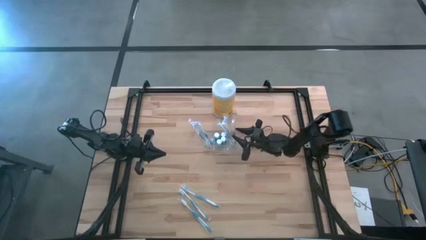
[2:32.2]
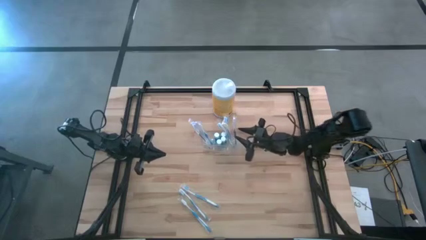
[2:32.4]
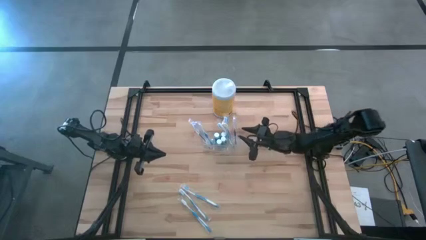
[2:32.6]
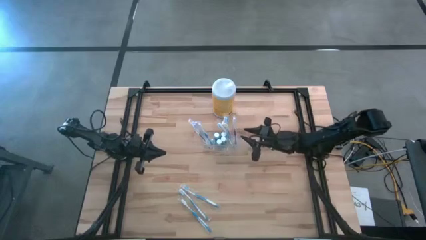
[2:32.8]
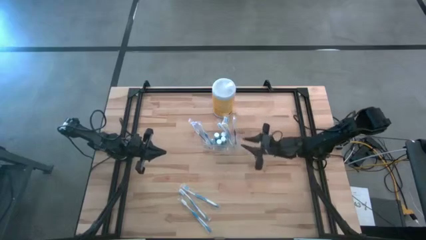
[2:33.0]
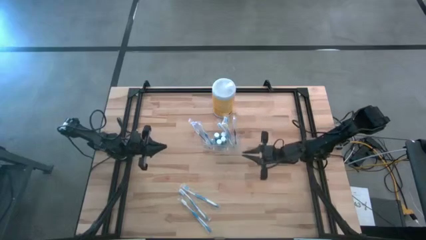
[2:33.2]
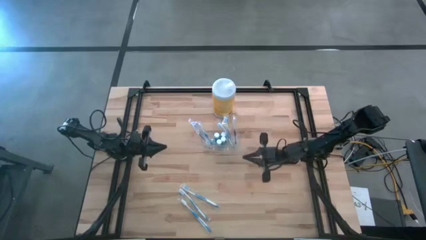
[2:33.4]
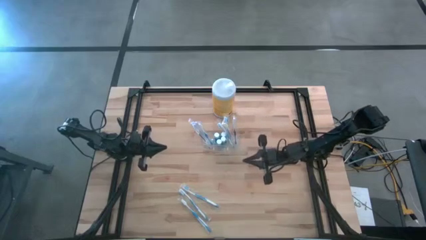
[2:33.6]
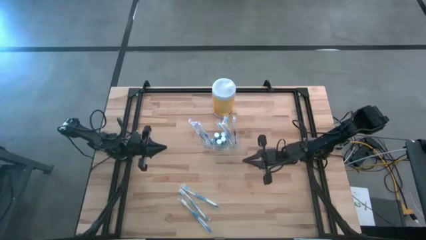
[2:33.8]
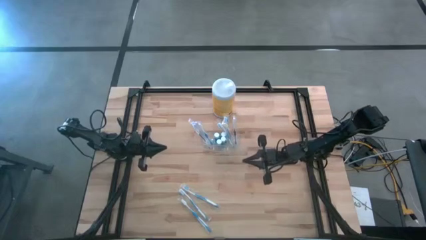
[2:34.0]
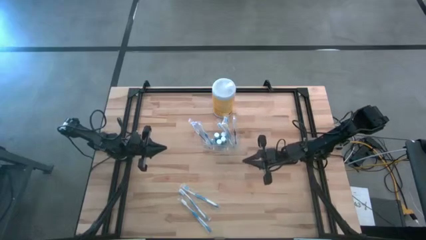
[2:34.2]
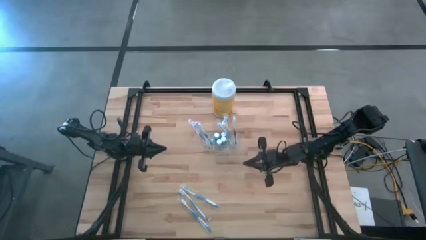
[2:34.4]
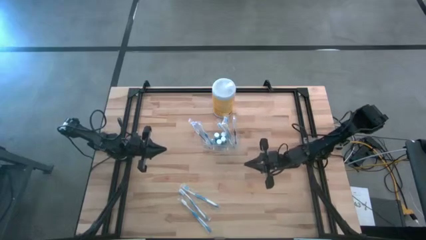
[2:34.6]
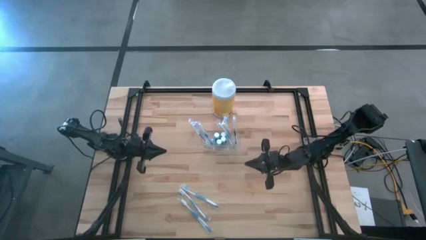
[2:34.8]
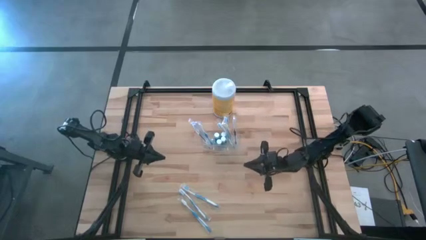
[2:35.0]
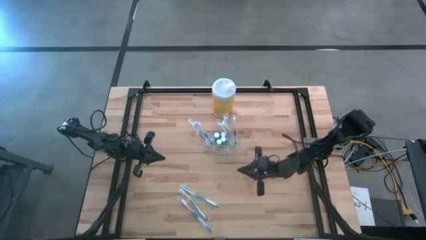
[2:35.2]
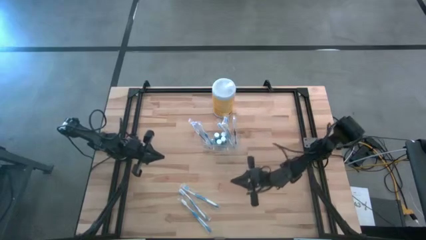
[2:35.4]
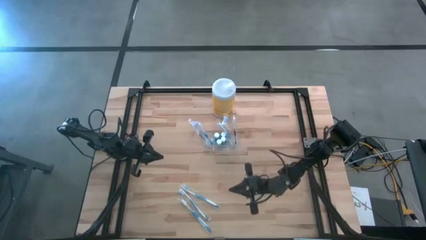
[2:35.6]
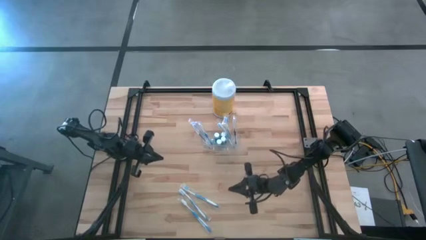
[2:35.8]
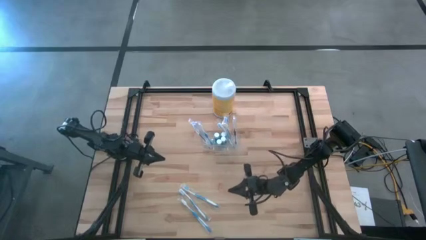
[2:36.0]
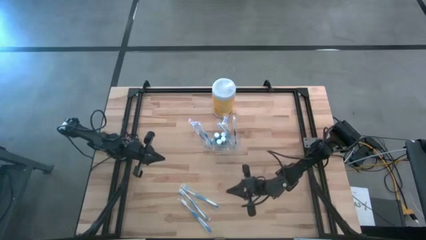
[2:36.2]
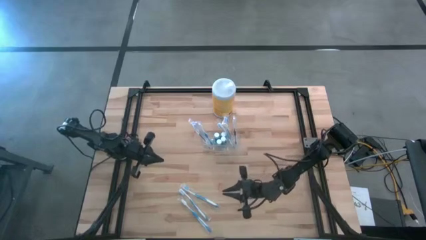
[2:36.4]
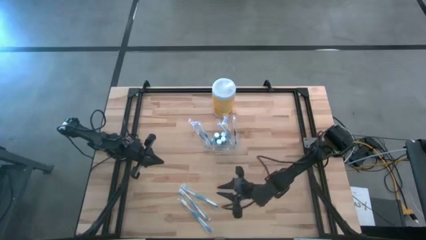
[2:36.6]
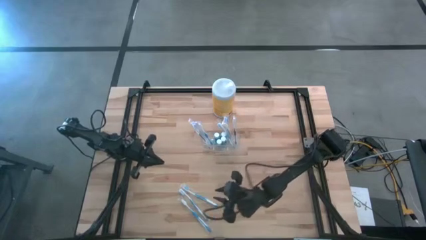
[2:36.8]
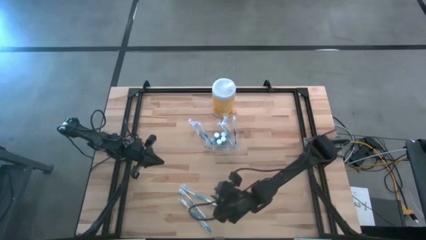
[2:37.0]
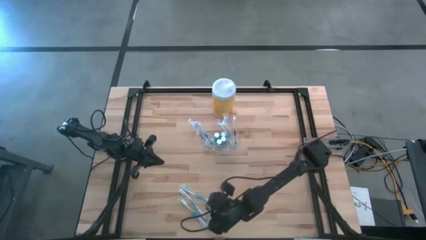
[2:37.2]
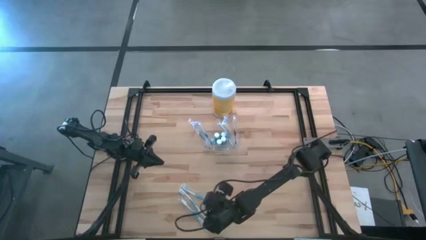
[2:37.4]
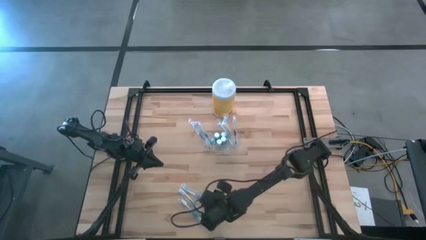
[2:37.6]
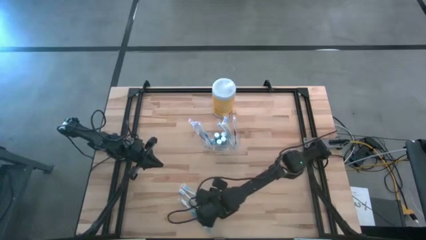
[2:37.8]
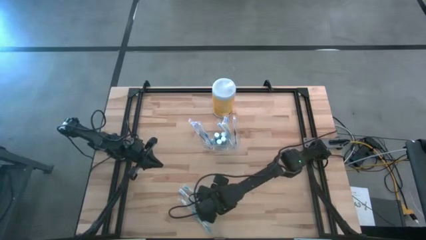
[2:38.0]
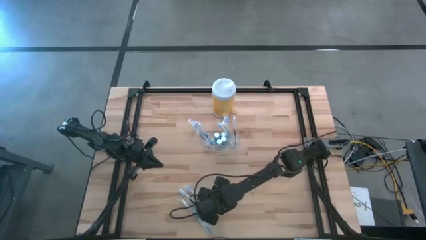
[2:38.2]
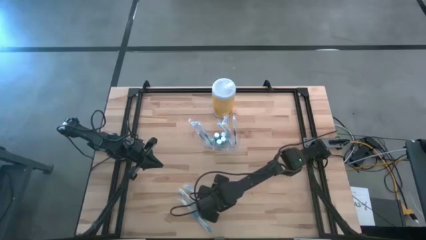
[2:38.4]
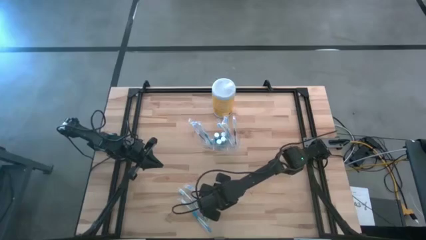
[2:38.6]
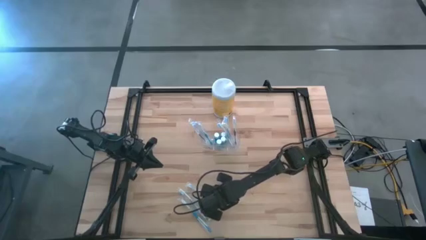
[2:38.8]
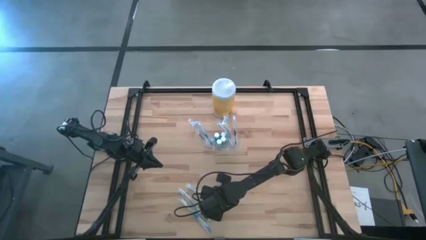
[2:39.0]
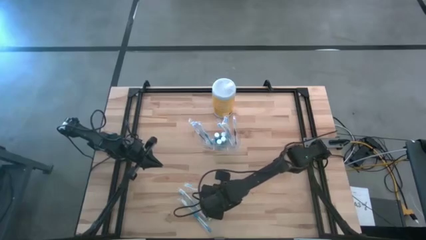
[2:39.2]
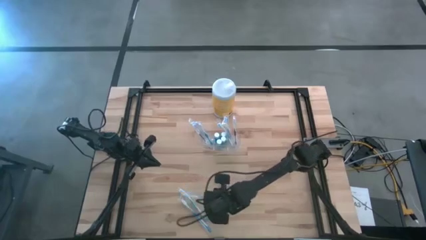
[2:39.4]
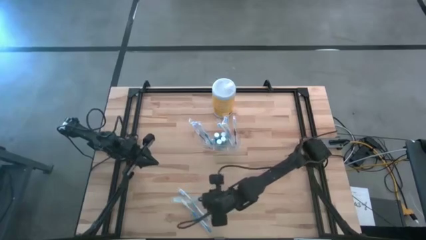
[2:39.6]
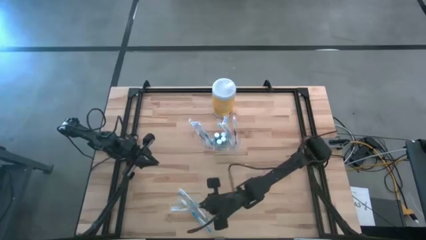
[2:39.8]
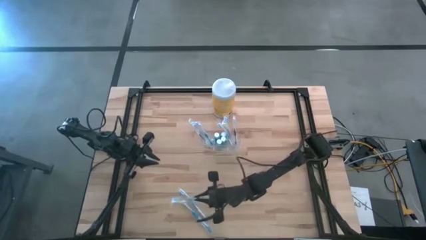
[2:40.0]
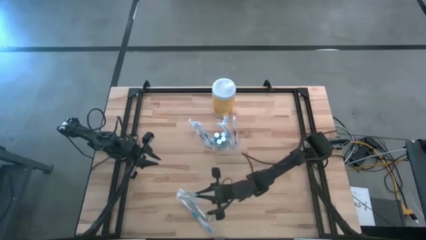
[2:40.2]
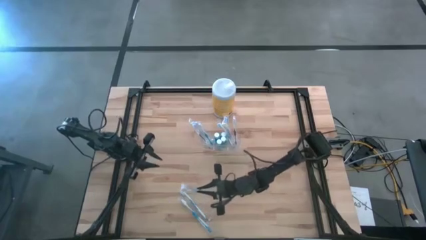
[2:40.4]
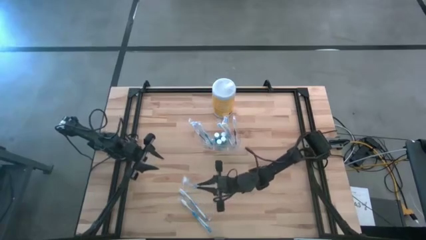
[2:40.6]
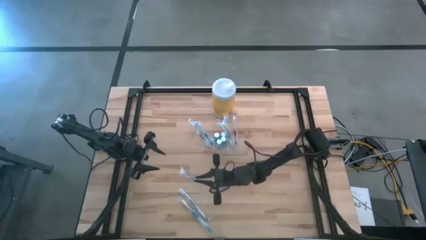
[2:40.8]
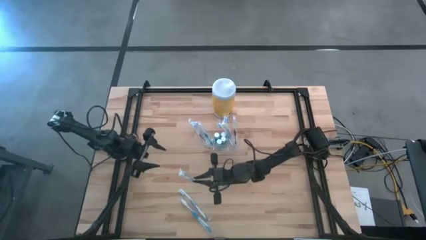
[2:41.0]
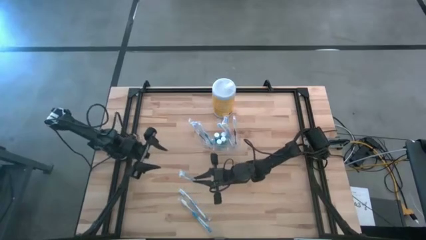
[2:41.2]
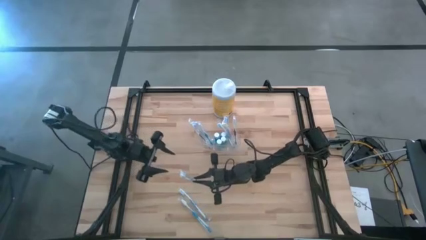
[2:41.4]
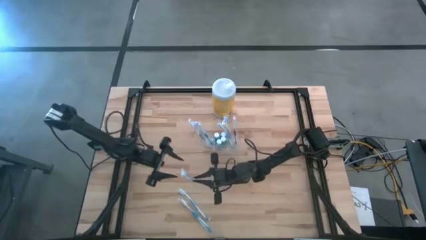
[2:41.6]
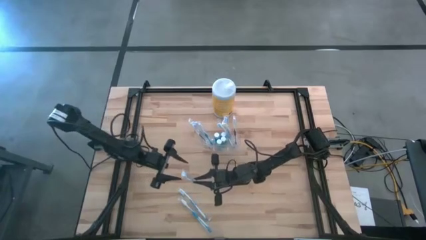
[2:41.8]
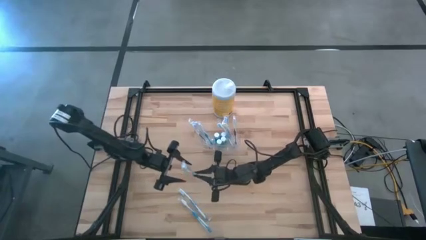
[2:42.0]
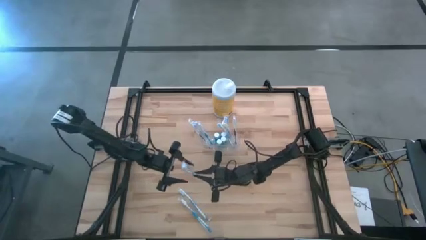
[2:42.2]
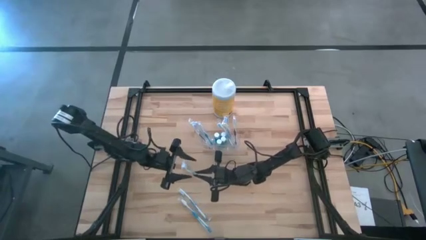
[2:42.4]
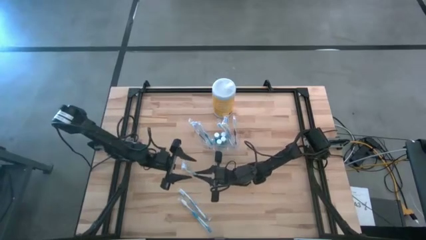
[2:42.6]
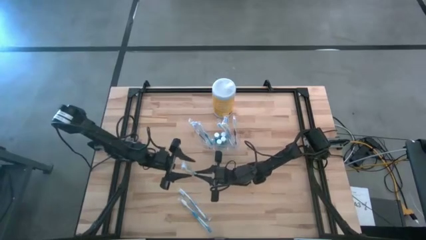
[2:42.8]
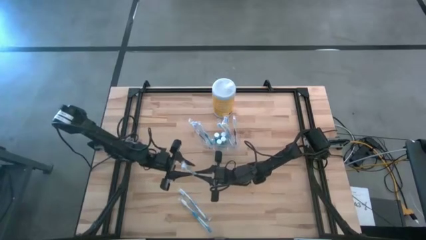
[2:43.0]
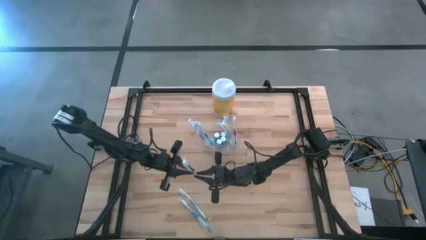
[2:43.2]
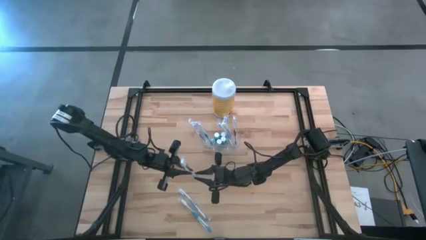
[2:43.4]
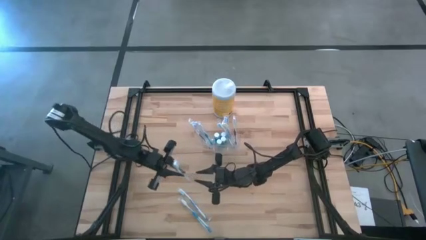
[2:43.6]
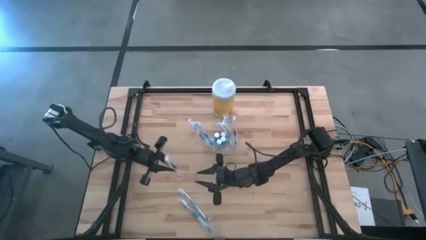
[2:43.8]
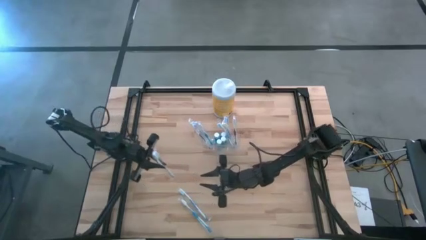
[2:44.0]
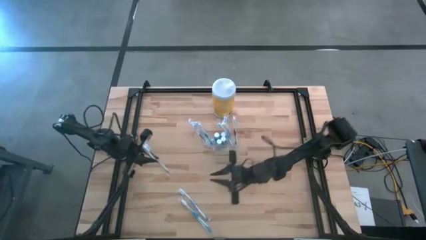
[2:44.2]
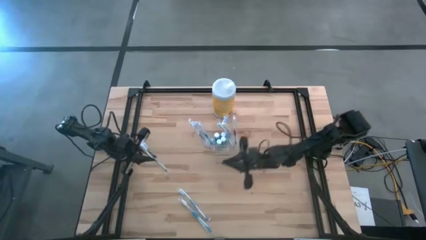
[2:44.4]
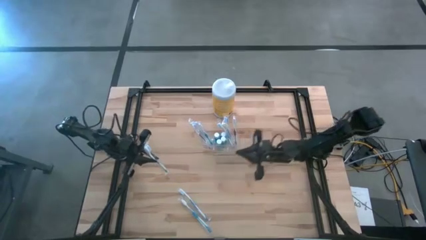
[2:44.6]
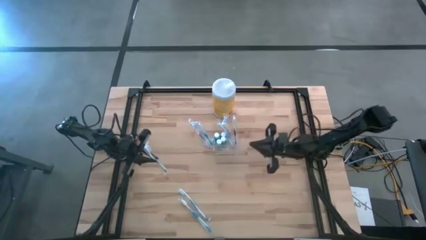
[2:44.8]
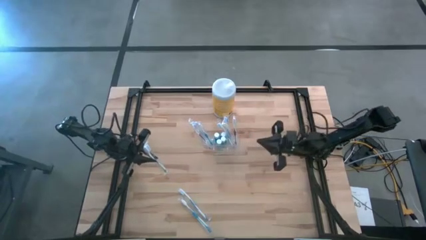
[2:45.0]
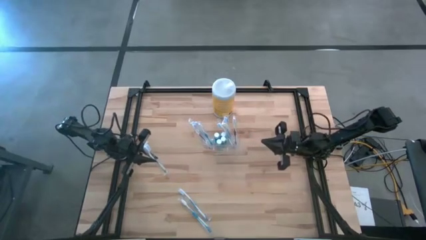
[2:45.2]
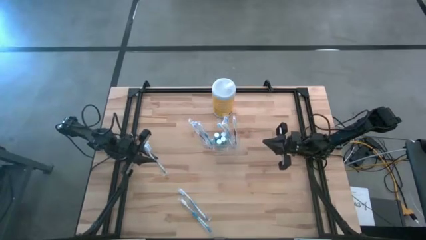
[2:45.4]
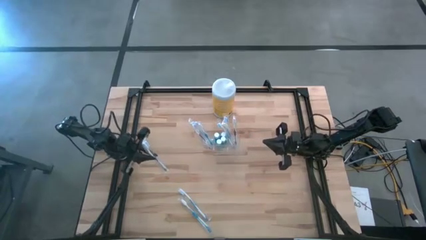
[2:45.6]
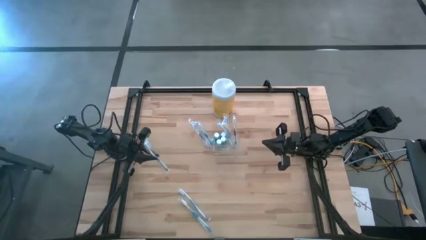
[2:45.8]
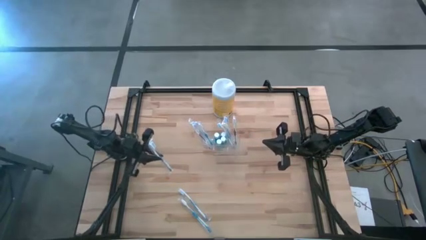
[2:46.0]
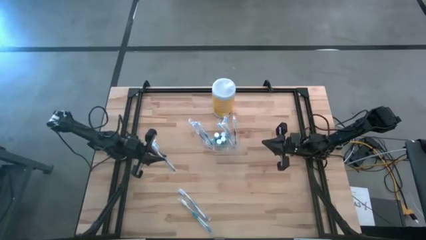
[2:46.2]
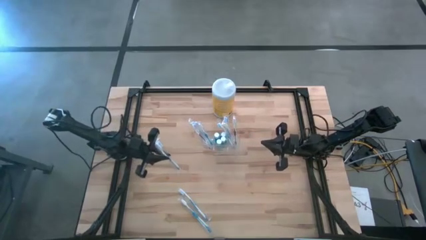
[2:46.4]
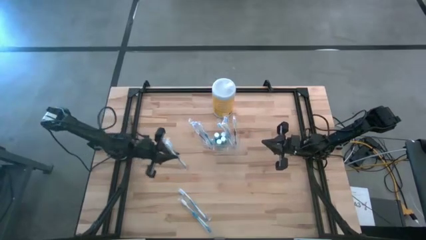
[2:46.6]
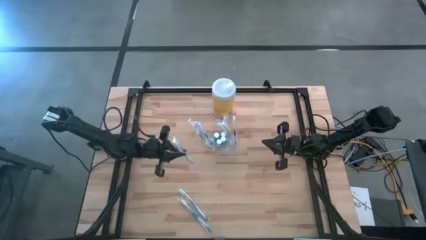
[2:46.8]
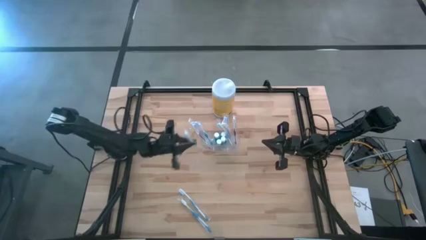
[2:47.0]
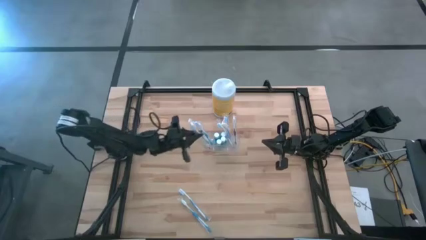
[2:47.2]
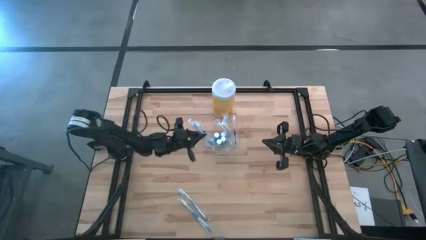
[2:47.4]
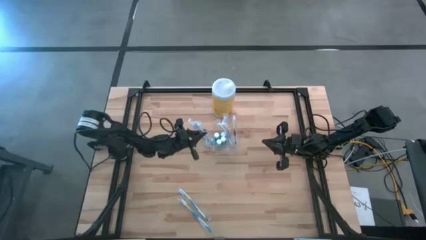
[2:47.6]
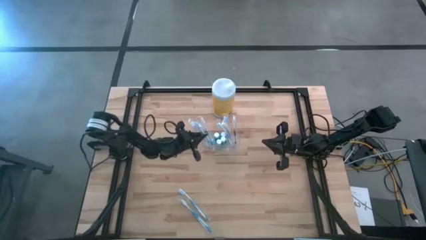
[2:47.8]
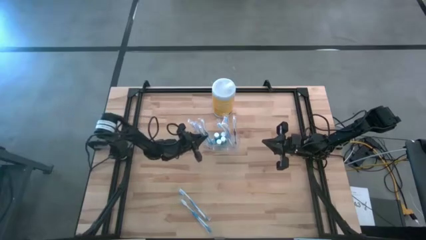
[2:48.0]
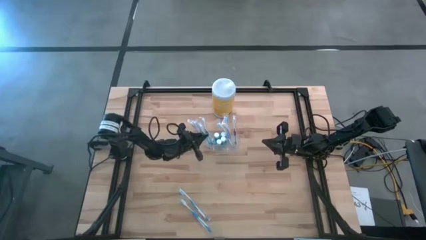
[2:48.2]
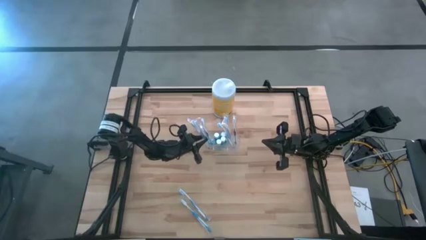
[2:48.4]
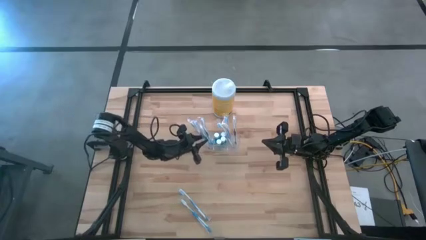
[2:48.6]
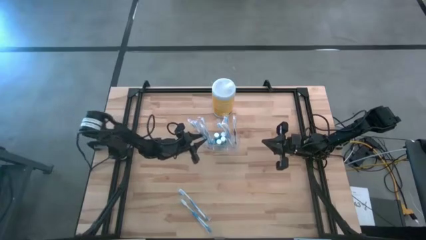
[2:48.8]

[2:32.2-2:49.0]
Task: Pick & Place toothbrushing station
Put the blue toothbrush into the transparent organizer
